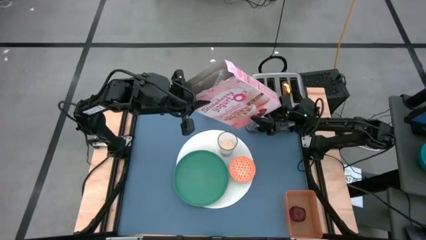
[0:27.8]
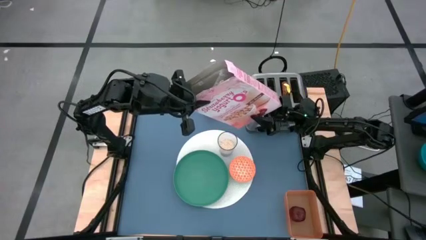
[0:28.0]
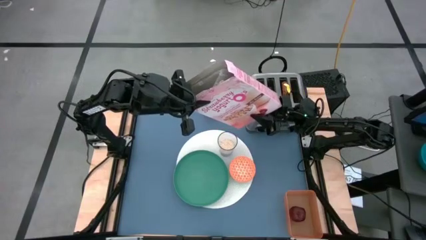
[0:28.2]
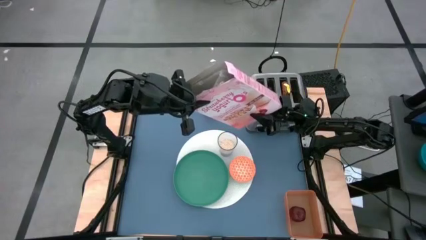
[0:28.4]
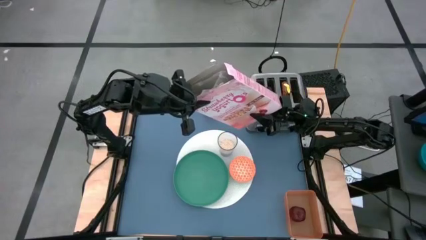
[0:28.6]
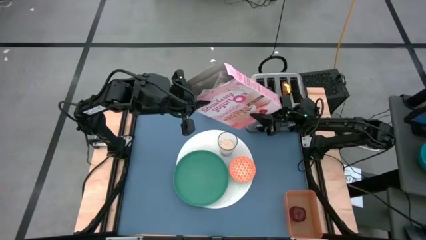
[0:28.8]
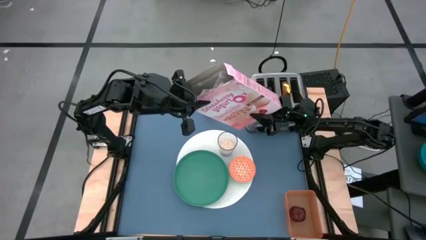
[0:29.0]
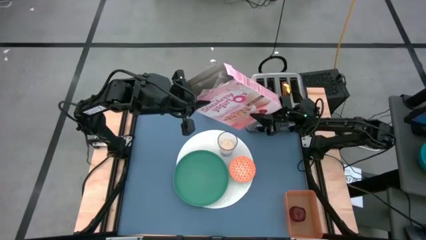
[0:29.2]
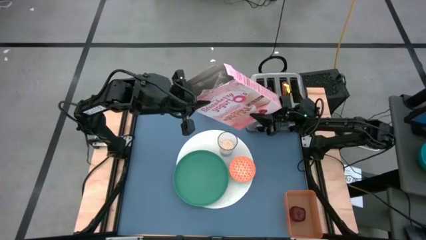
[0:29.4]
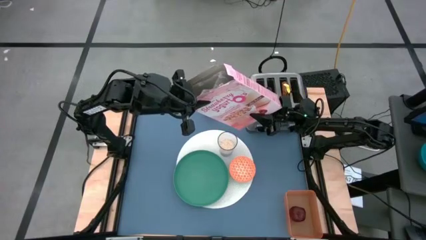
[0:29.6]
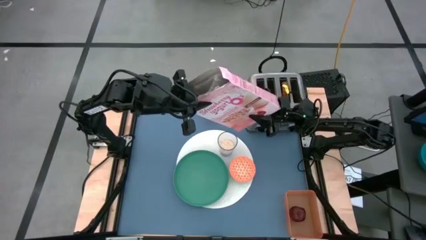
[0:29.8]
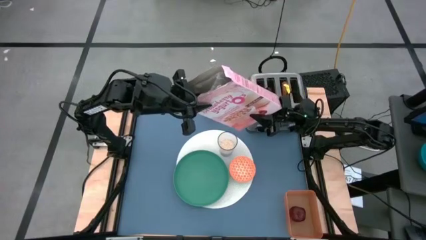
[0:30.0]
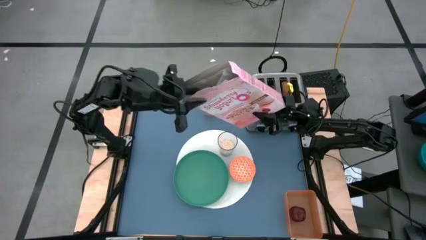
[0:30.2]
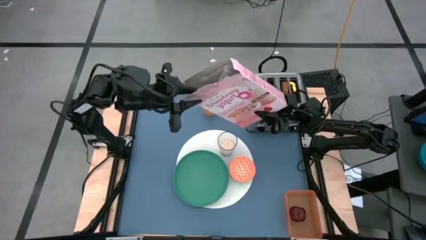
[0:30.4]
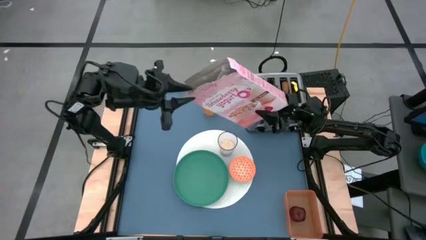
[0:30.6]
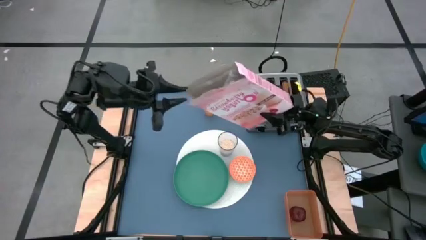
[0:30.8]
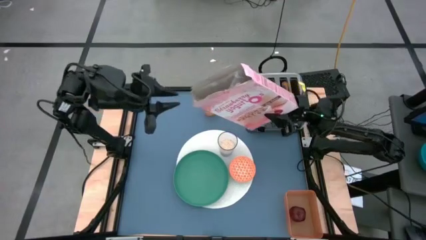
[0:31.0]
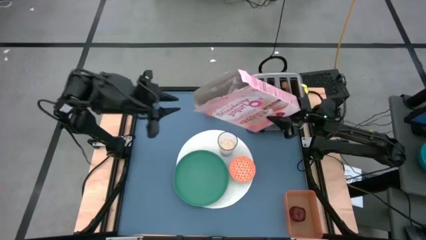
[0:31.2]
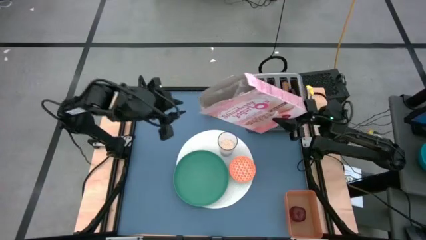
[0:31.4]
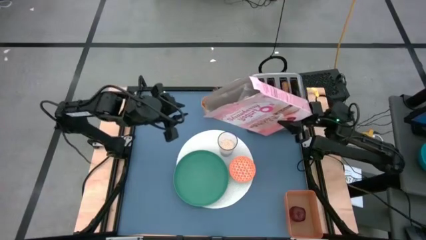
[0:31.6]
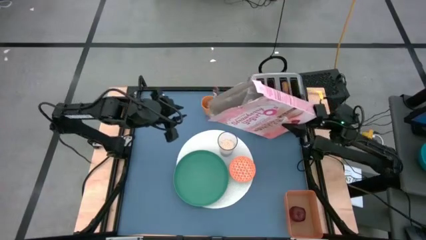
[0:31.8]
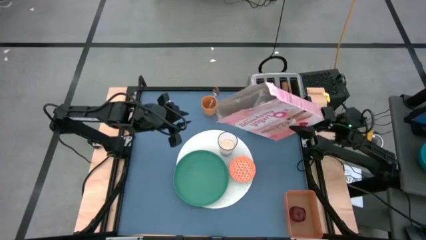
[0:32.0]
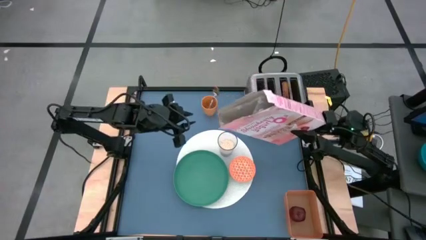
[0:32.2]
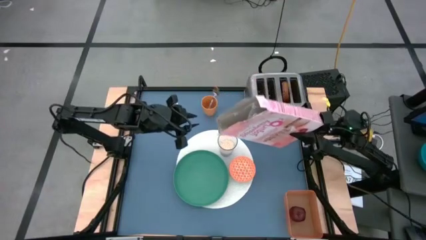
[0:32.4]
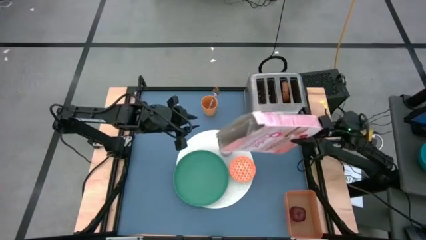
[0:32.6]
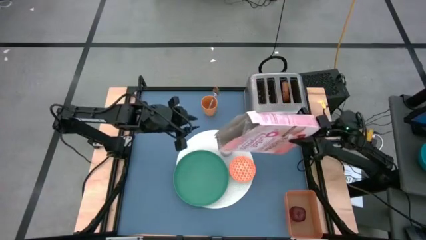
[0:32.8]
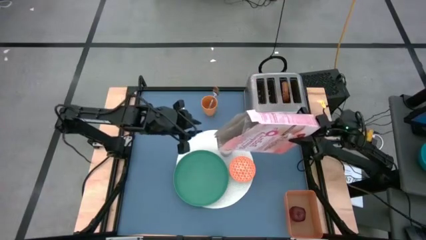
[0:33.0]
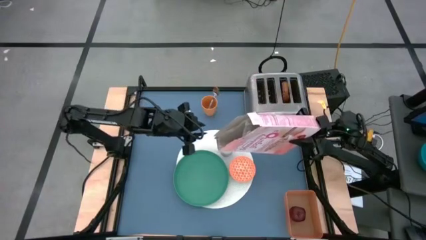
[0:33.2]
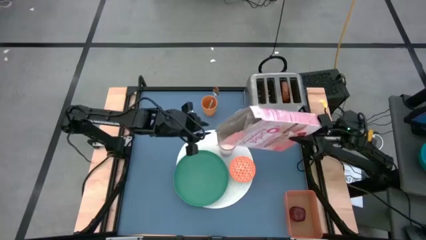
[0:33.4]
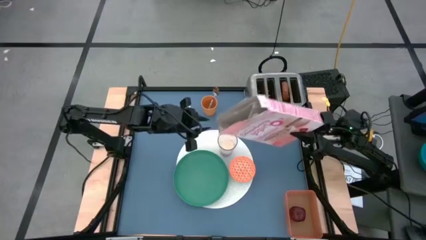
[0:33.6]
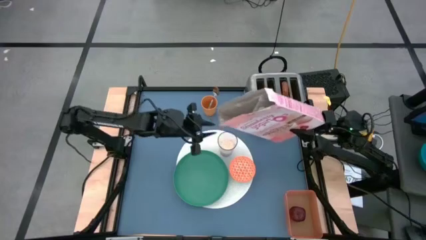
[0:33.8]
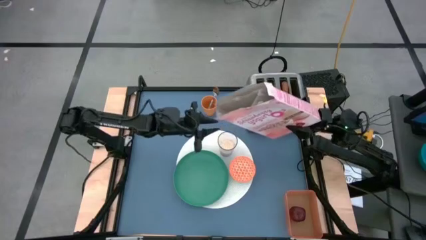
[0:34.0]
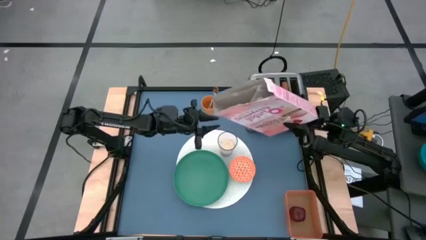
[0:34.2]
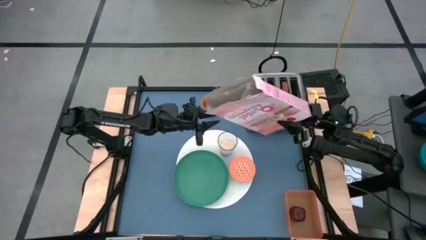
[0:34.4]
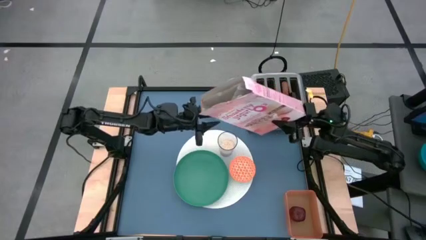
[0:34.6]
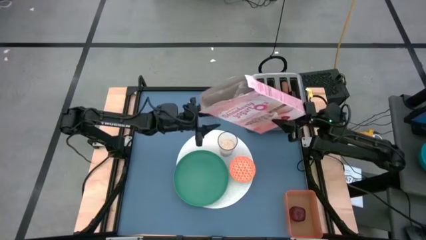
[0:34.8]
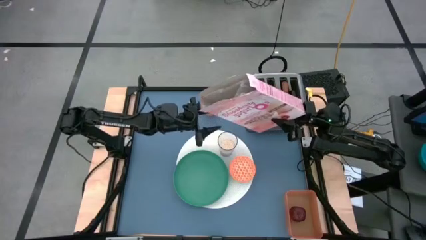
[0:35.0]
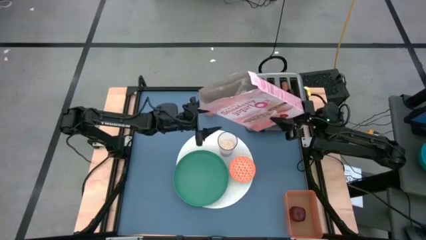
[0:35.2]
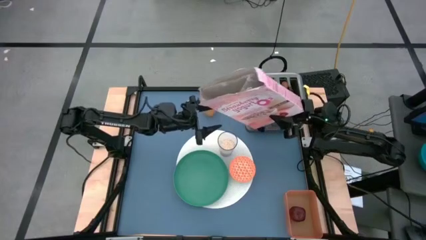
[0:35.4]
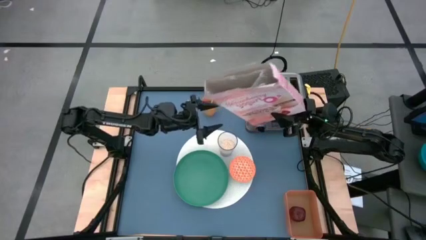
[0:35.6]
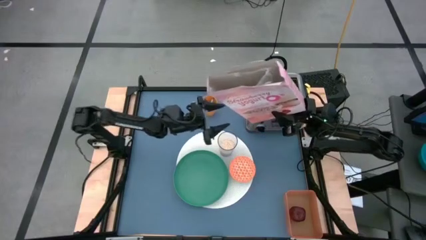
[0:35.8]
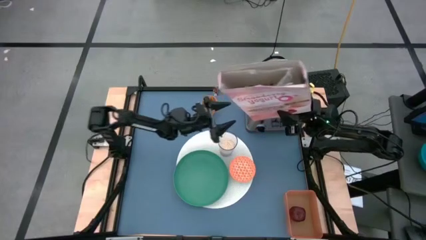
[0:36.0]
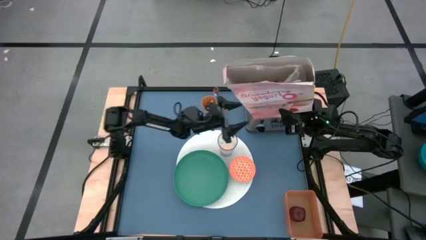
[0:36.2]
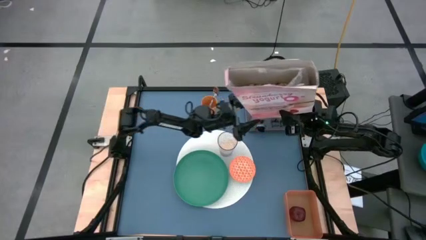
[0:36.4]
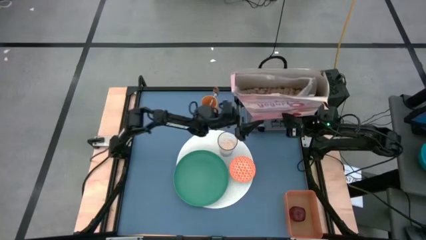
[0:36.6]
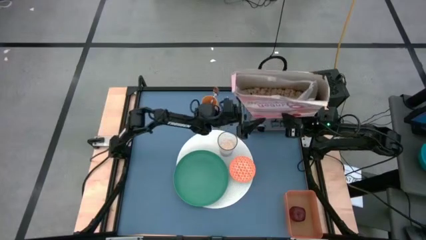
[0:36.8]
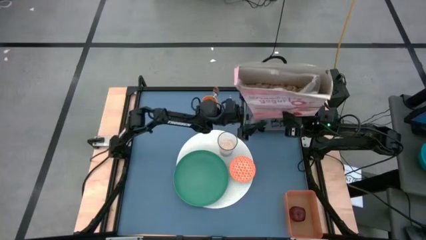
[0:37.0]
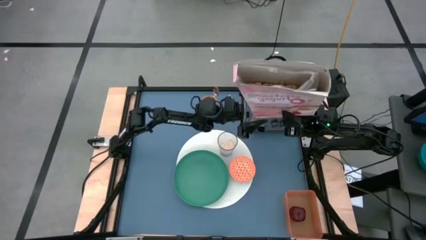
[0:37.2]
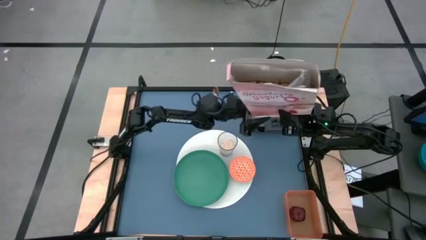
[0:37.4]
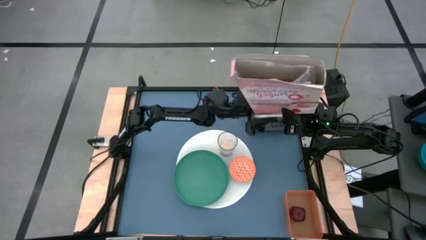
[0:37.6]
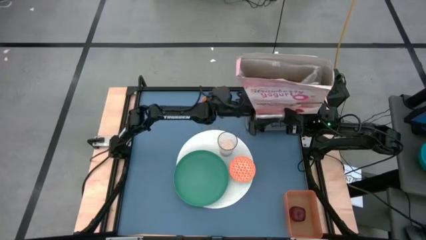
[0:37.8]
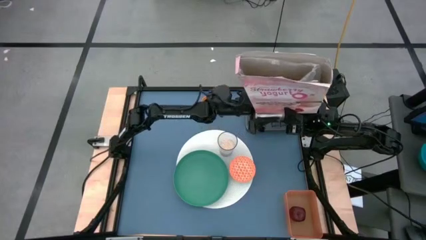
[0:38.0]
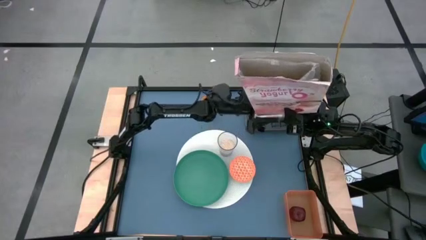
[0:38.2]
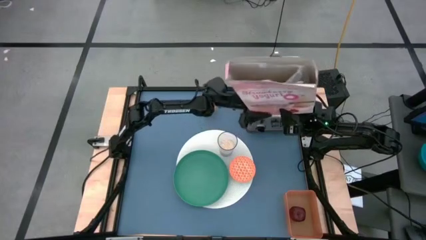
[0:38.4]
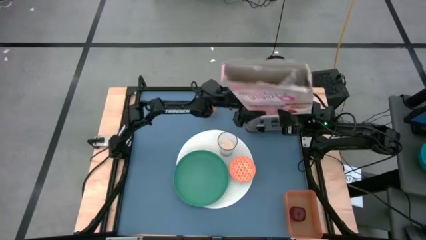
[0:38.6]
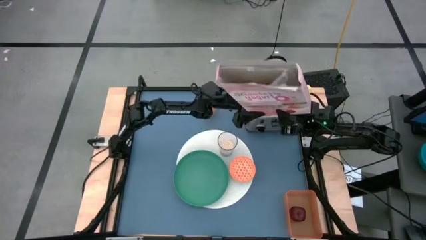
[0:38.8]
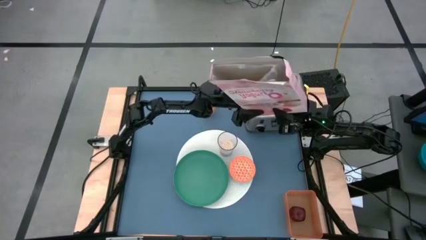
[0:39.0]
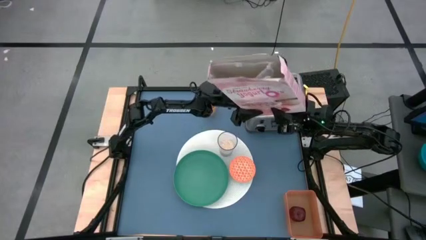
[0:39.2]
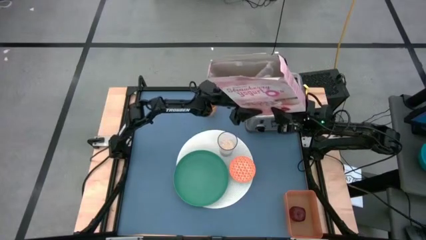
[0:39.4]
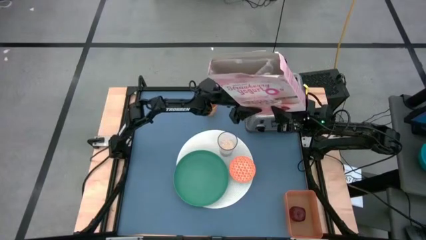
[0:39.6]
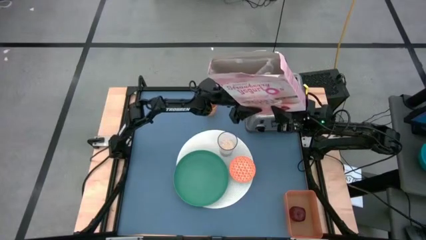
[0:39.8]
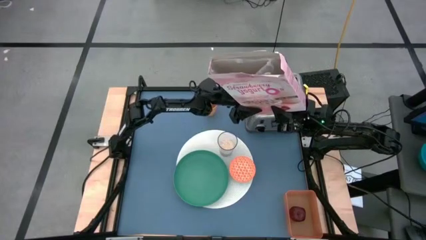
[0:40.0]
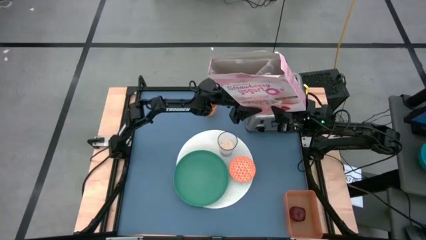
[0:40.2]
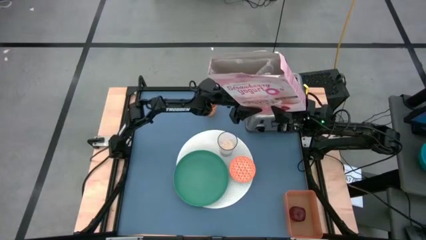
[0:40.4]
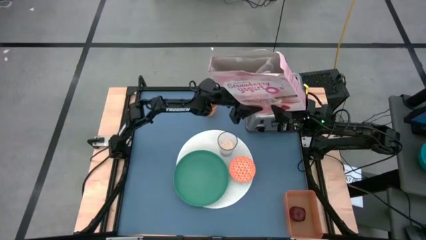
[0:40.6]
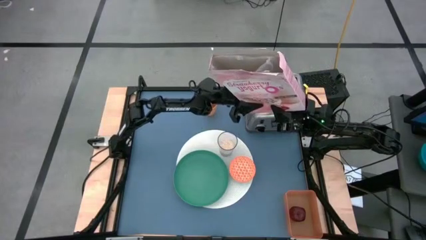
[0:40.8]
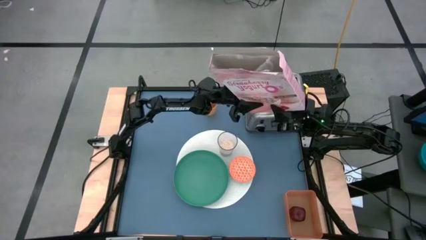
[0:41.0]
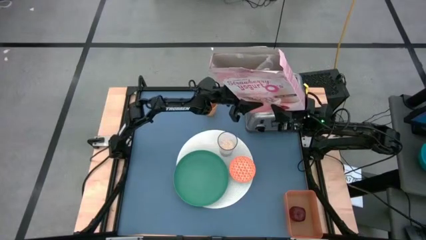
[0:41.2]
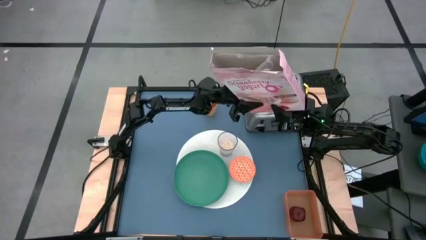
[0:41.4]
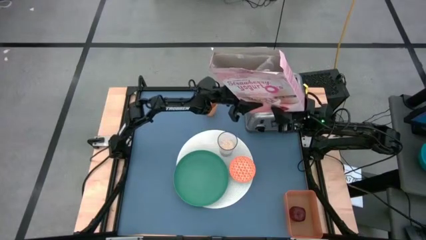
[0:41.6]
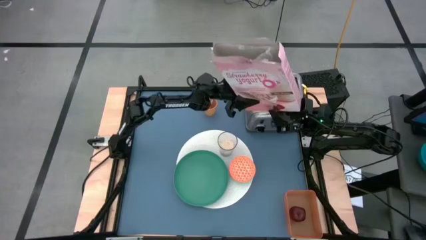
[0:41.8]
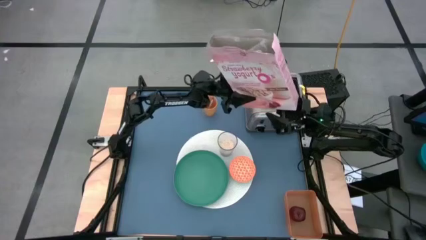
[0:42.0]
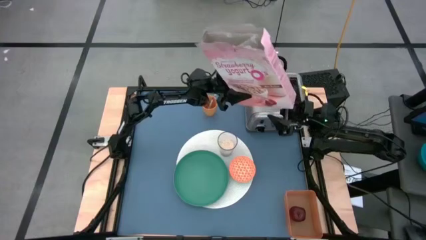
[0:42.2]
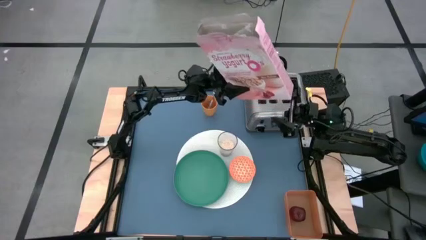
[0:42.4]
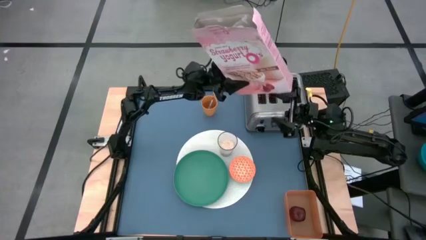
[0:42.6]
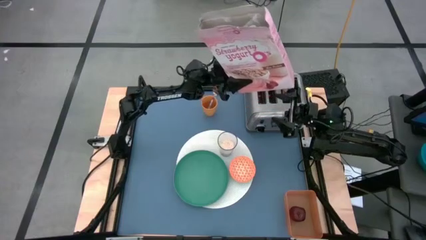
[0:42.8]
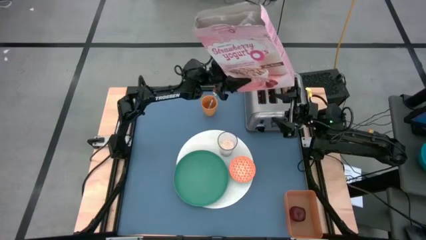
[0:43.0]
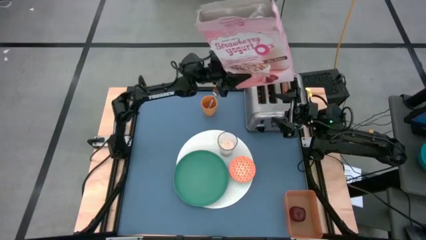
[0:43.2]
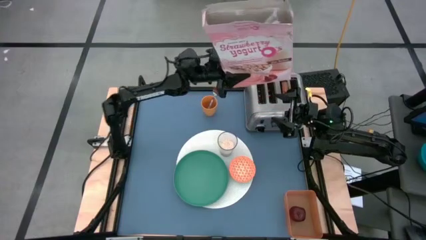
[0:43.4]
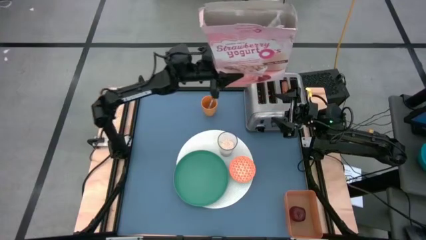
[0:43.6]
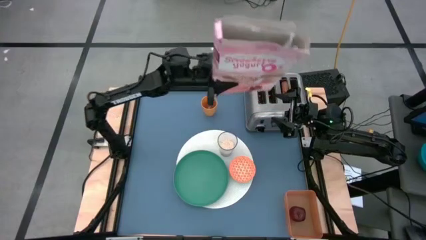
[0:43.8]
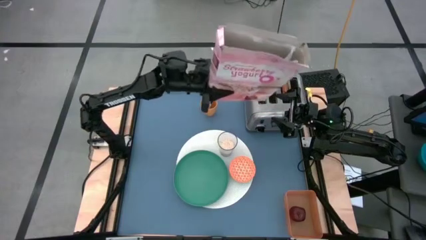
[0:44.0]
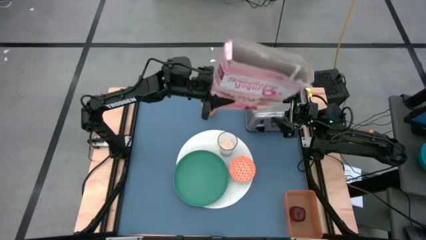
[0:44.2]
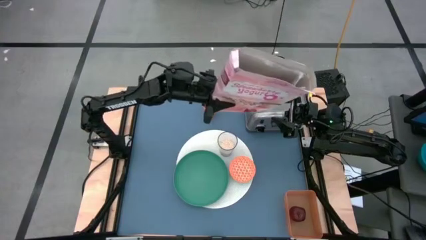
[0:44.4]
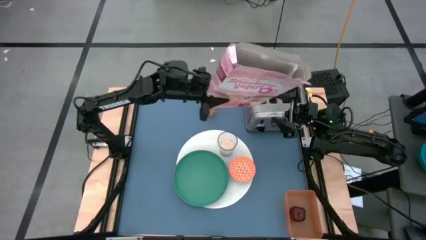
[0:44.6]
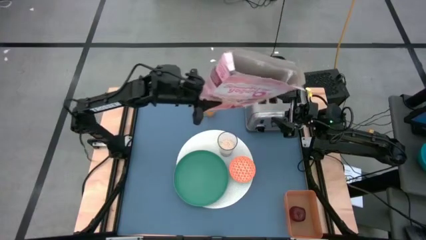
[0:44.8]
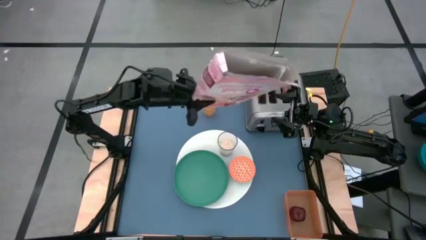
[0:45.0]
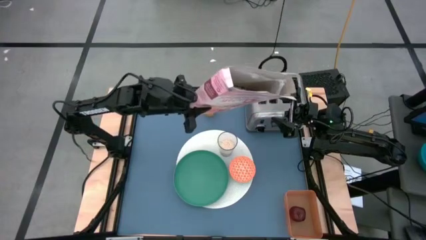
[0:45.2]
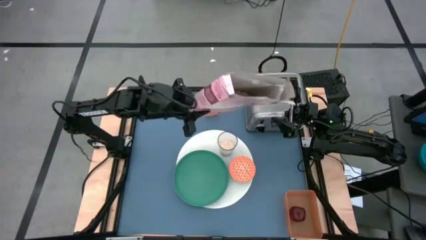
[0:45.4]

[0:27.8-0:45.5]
Task: Arrange a breakfast setting
Pour the cereal into the orange bowl
